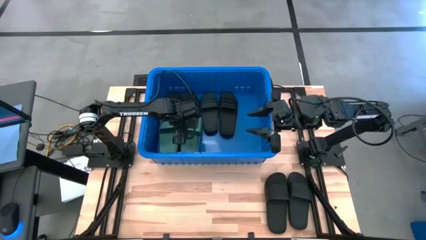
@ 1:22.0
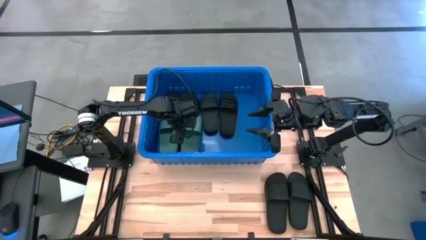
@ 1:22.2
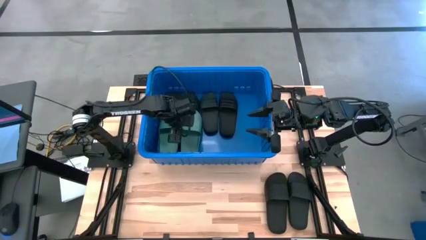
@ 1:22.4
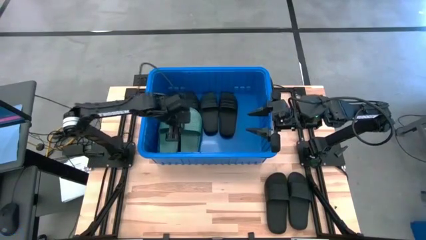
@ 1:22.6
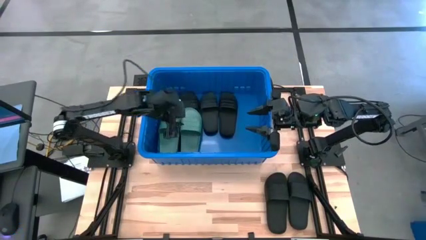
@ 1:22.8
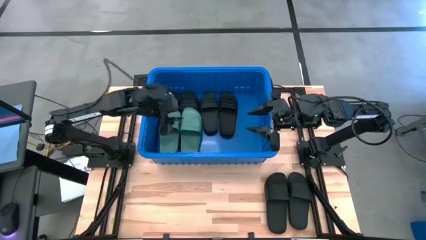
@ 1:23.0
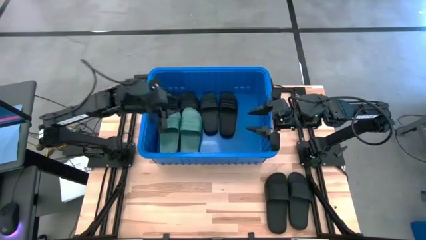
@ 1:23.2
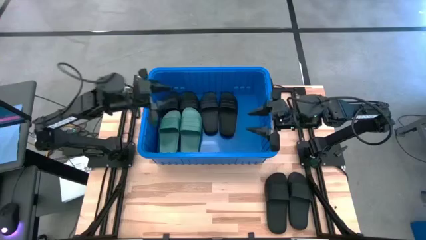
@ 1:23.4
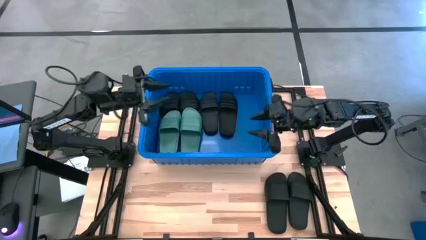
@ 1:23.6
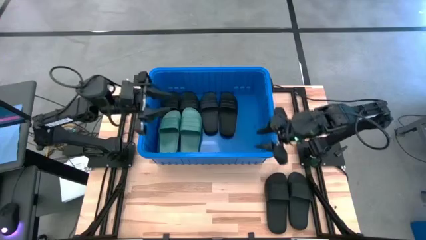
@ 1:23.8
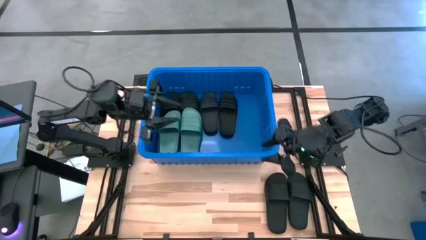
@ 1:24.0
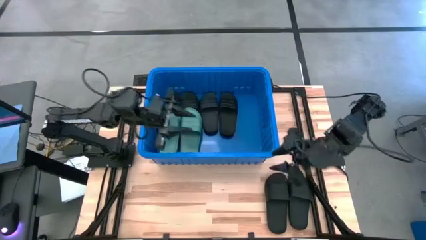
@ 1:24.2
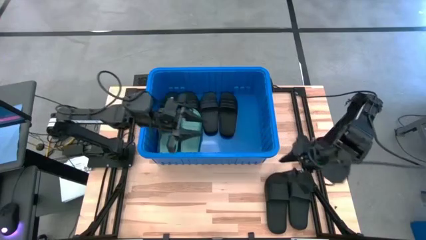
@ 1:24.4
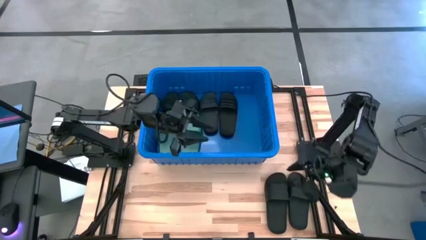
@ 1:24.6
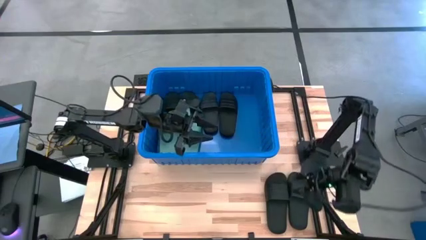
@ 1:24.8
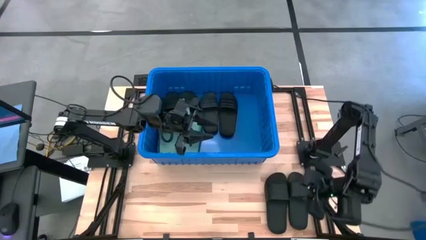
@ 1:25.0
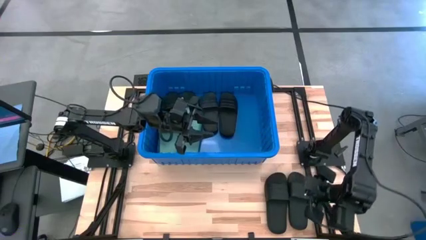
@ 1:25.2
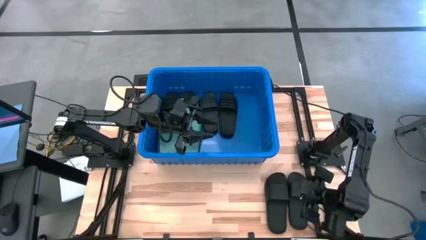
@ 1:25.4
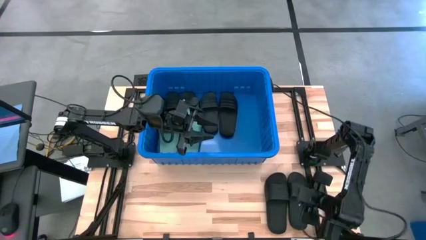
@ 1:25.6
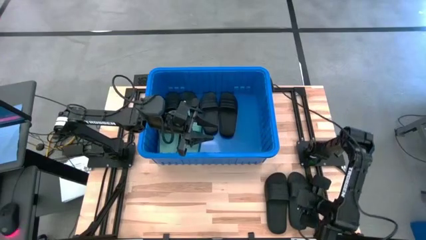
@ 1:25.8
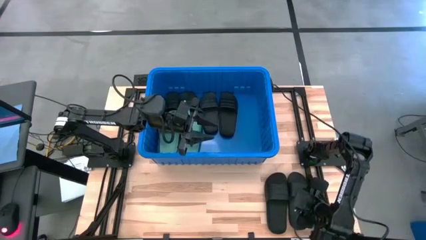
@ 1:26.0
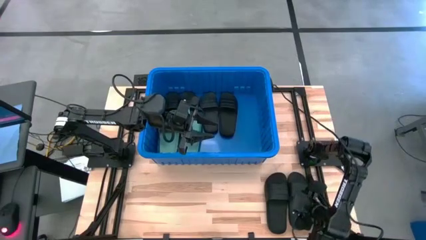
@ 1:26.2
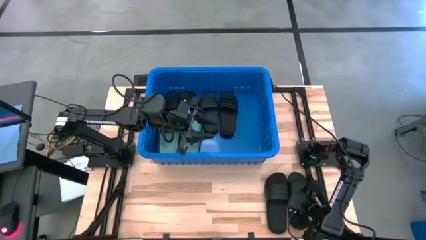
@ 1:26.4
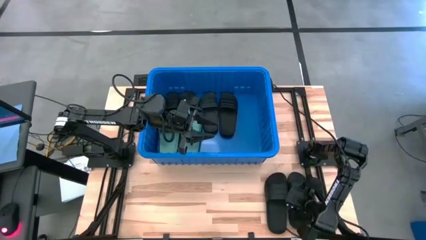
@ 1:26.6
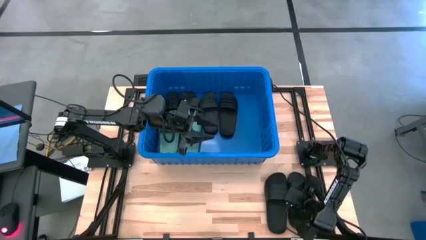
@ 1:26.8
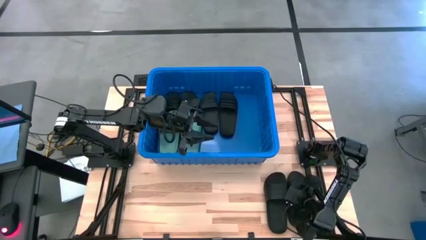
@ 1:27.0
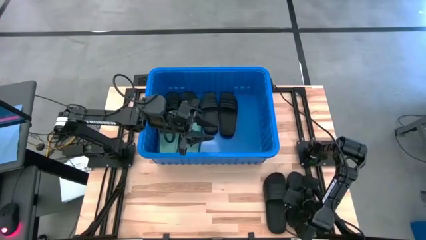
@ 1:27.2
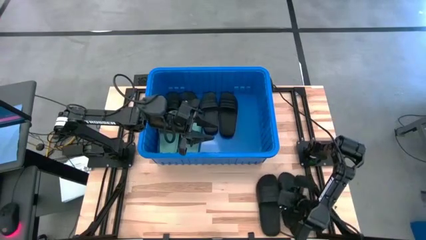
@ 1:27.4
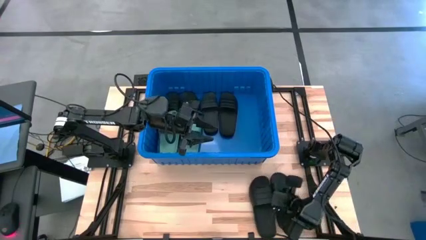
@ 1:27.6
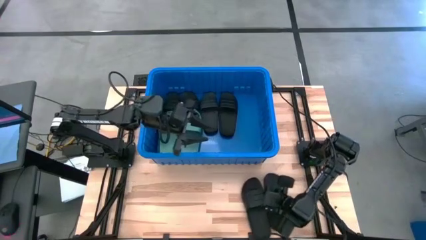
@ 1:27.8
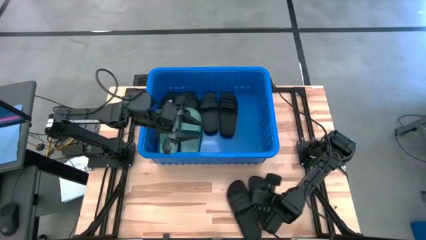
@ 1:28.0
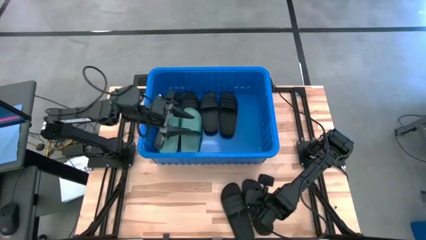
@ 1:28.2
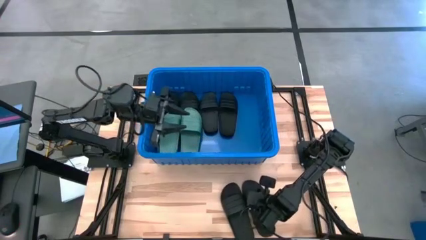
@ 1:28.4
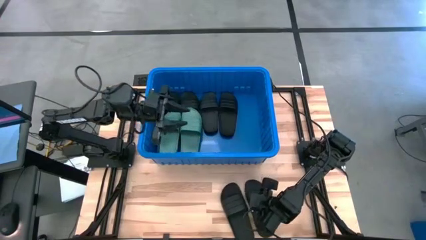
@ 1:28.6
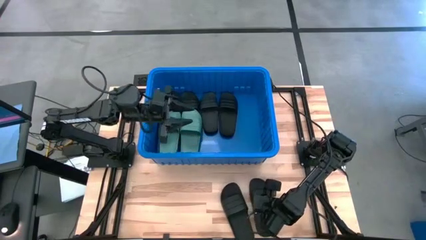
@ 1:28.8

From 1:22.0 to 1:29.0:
Task: Pick and place slides into bin
Adjust the black slides on the table

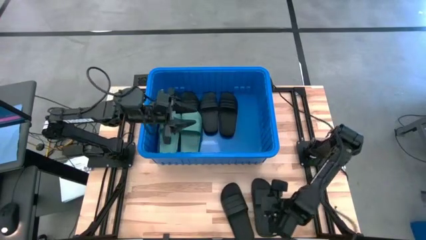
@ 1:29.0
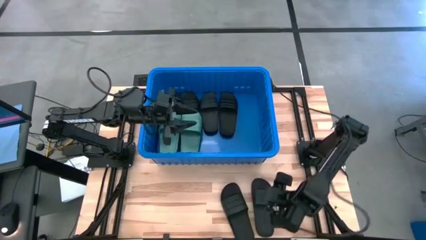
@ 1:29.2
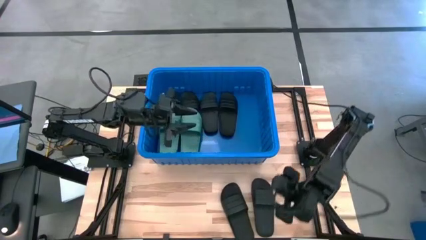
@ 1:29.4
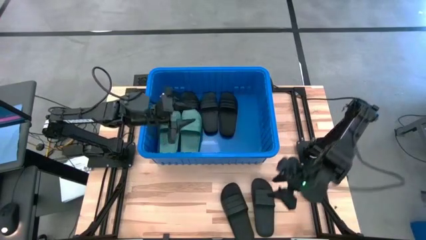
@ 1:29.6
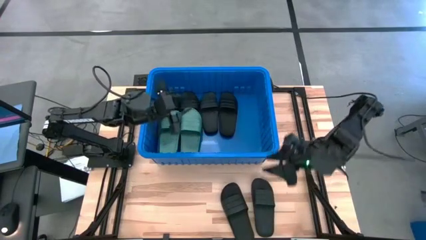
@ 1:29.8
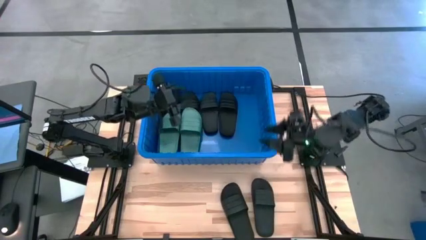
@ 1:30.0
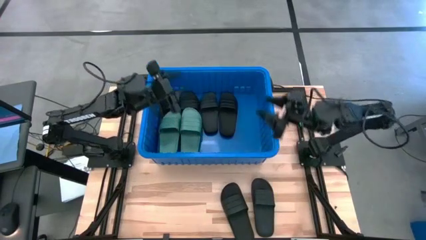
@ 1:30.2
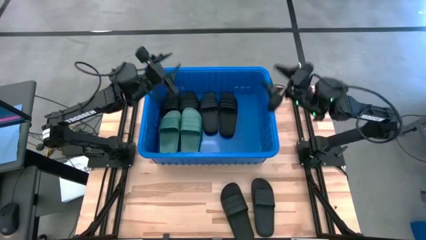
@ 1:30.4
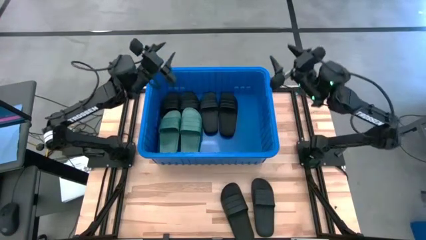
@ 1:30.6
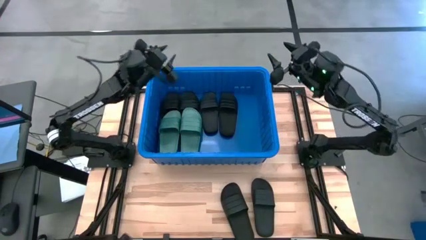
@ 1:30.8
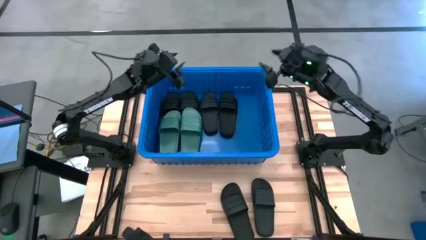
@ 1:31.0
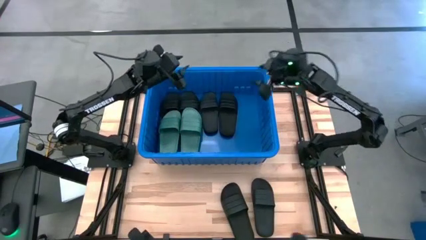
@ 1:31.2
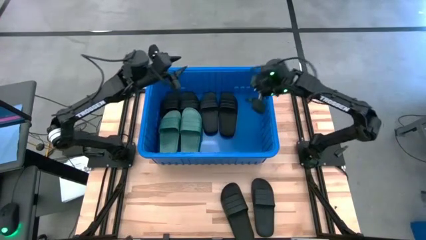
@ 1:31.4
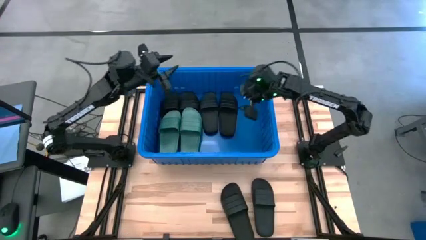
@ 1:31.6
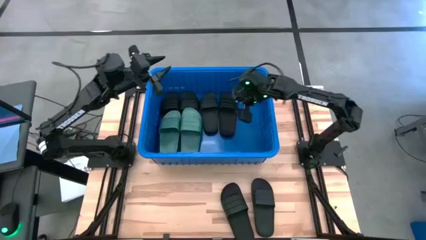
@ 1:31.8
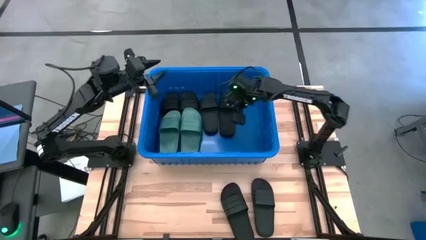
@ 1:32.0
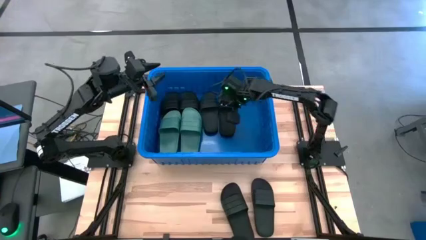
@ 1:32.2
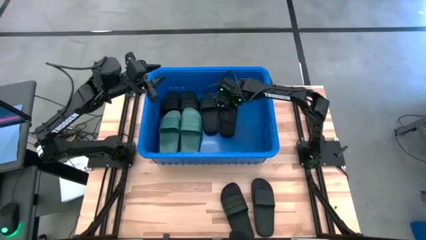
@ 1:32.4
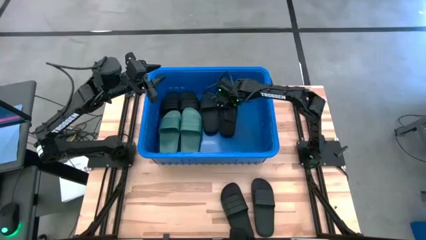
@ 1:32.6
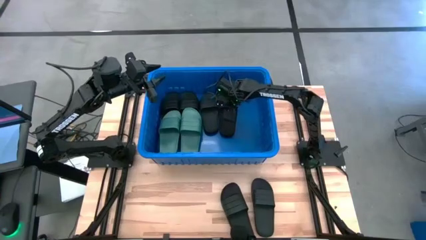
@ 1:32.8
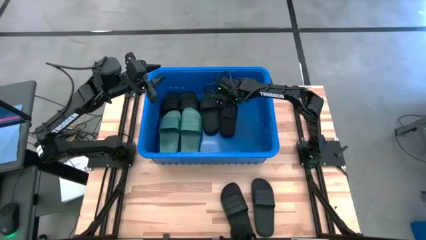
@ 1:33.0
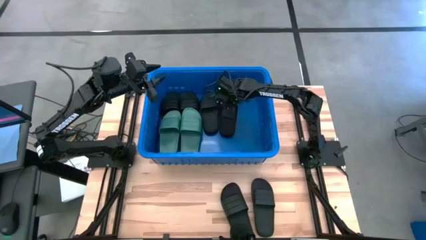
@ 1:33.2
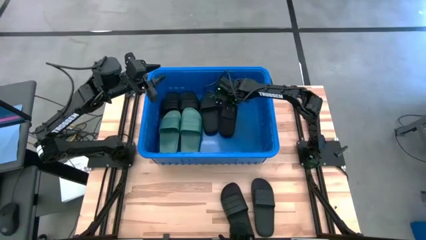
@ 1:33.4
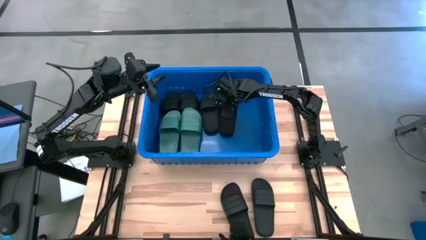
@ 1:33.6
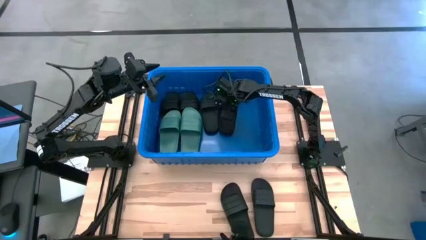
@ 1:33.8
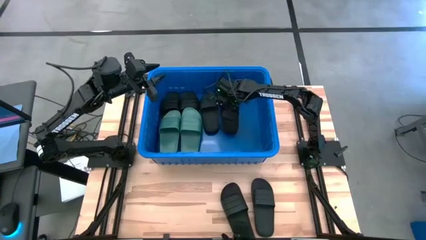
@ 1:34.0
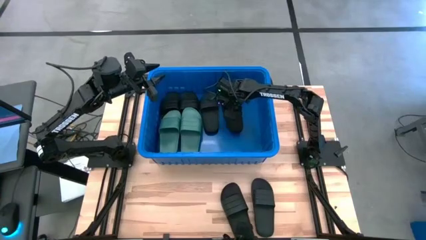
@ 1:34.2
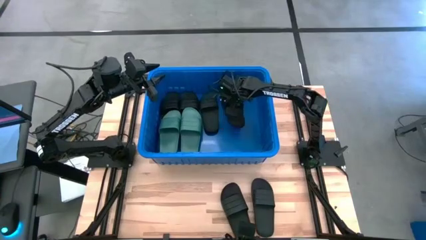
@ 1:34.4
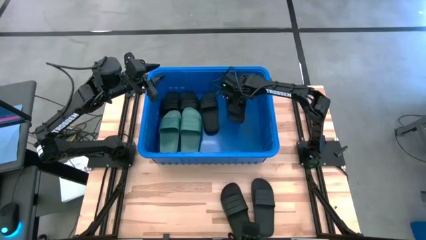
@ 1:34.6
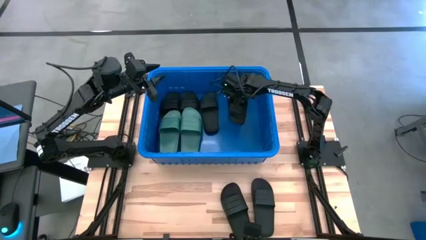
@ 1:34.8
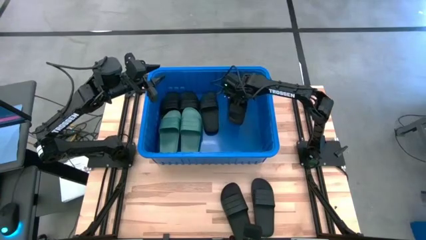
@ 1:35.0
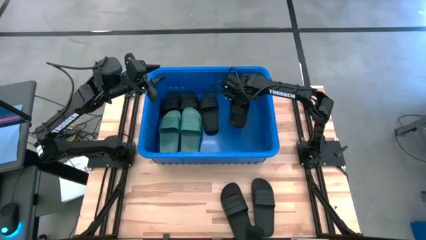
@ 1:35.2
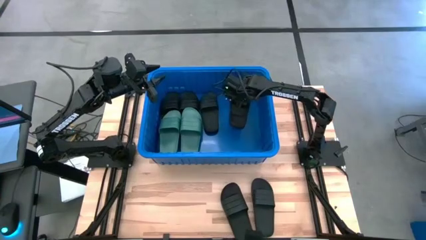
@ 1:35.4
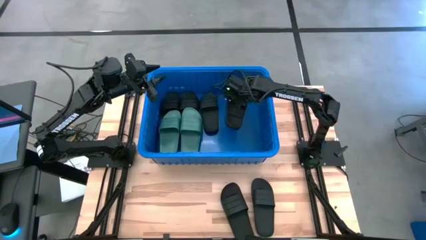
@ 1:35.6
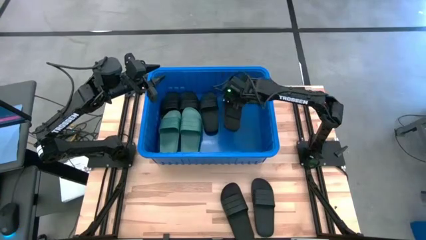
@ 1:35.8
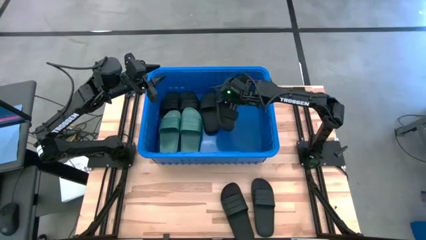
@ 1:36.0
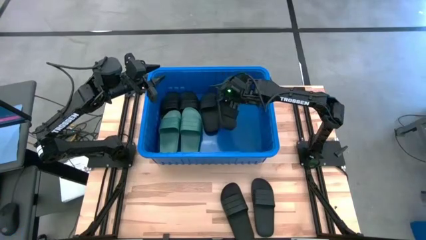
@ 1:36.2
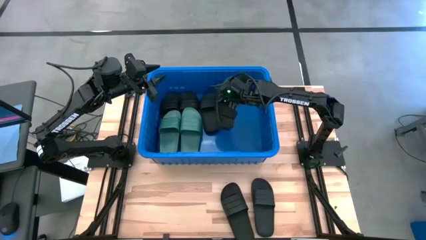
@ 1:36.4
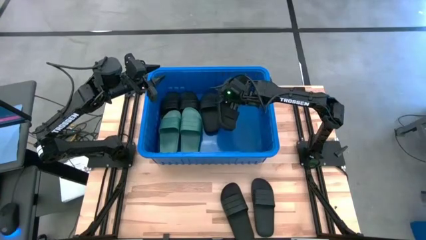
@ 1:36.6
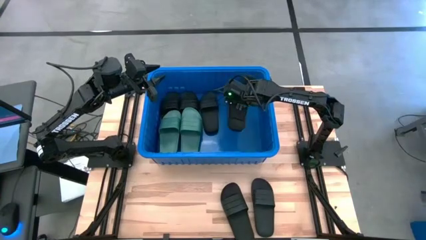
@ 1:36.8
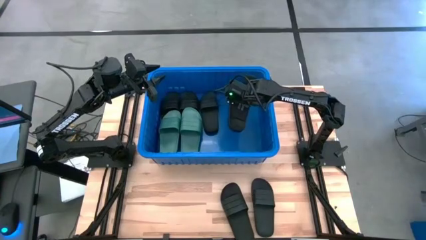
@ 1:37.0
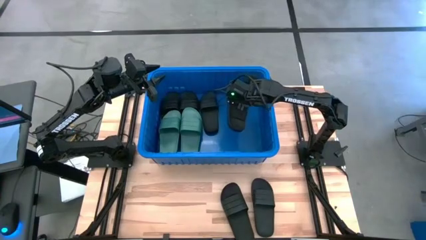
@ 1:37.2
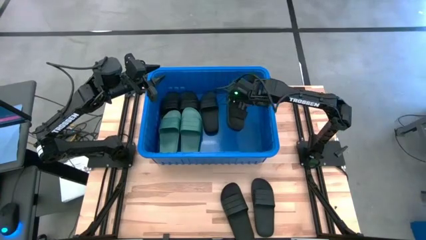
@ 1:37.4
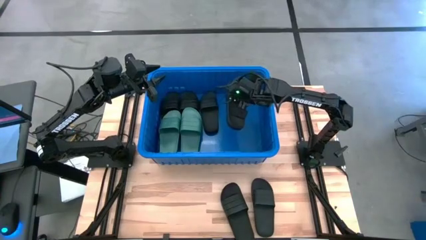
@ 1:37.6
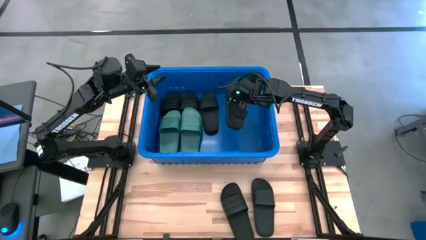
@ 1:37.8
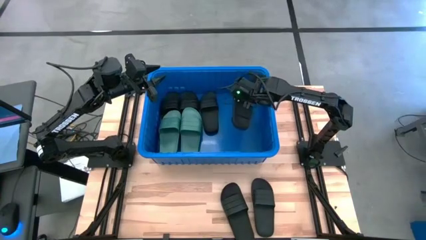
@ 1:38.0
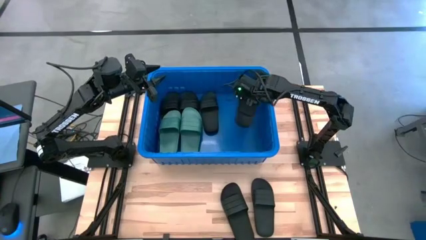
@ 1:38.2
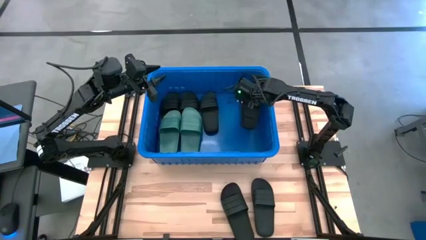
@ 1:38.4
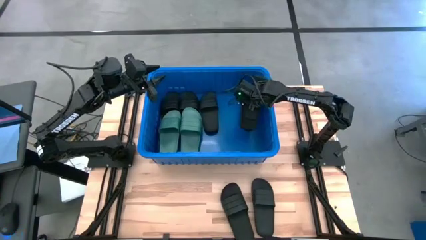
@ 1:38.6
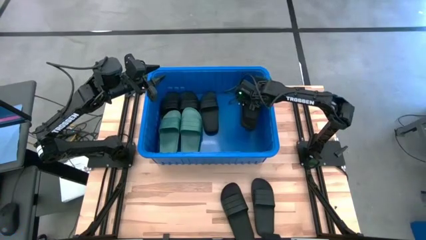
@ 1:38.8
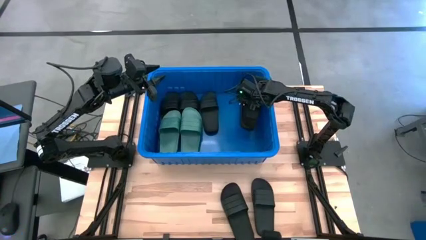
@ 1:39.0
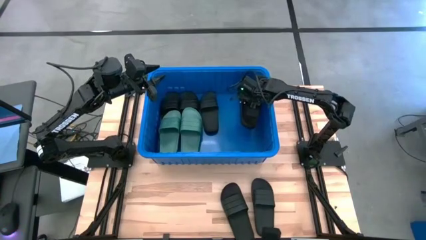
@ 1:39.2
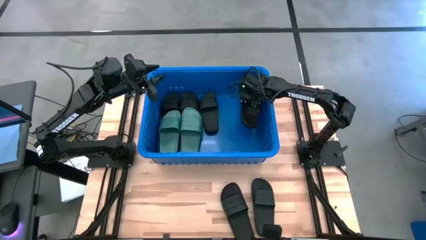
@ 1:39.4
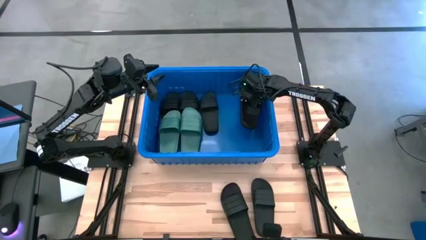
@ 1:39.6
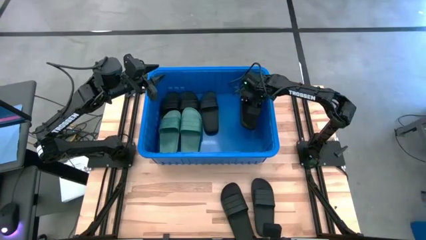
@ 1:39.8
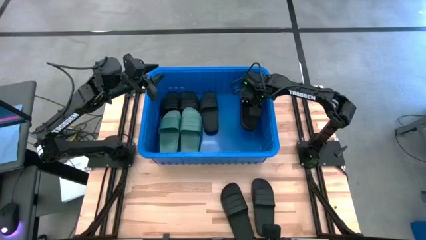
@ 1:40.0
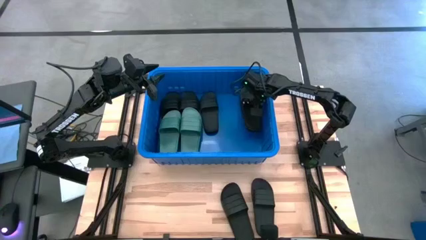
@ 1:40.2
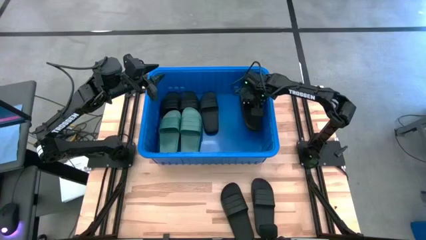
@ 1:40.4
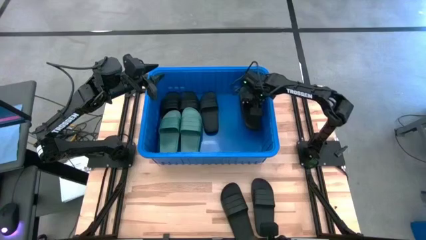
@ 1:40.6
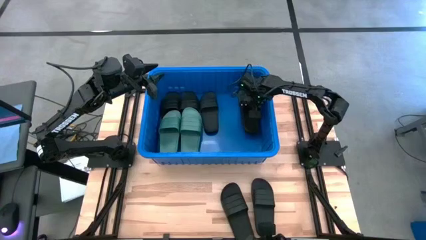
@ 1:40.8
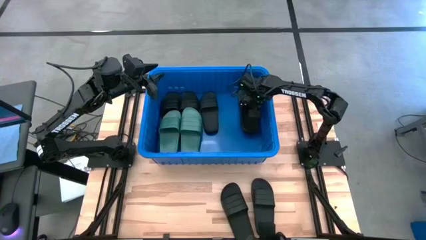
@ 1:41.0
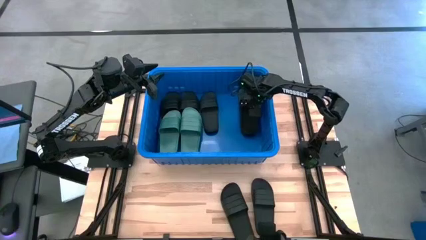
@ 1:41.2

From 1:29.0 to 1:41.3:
Adjust the black slide in the blue bin
